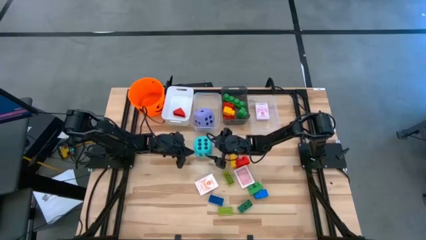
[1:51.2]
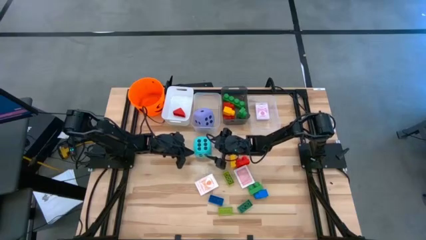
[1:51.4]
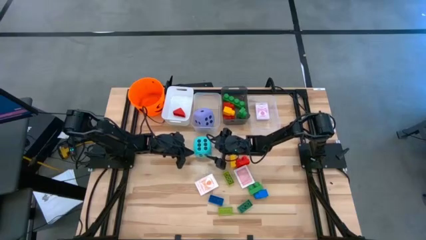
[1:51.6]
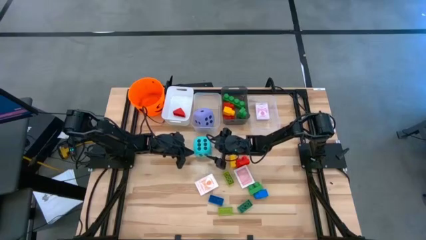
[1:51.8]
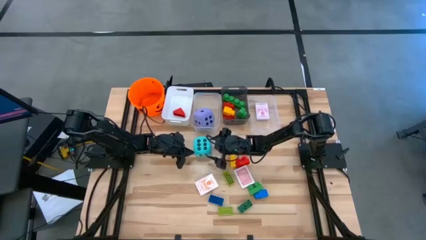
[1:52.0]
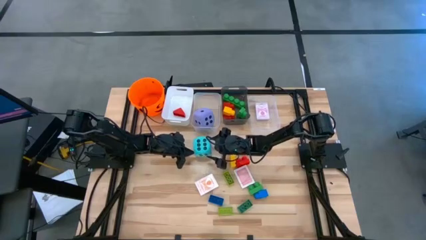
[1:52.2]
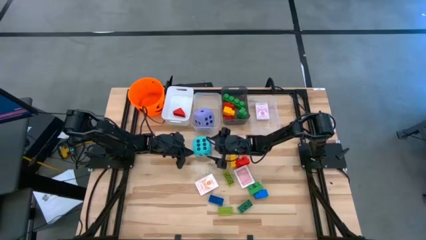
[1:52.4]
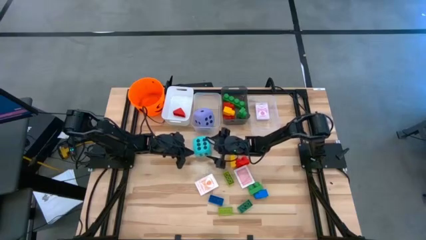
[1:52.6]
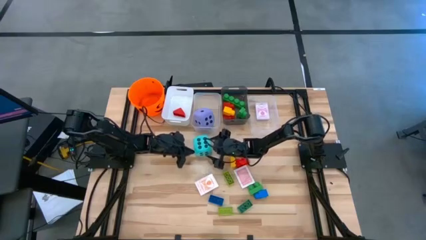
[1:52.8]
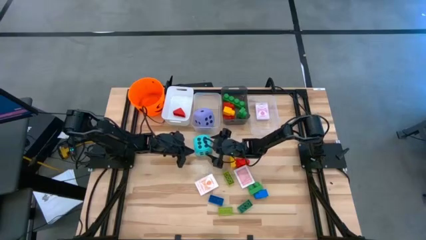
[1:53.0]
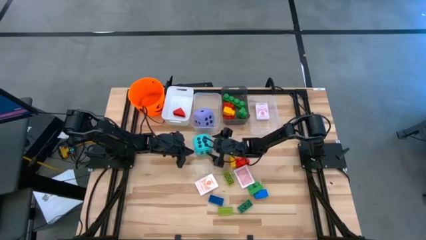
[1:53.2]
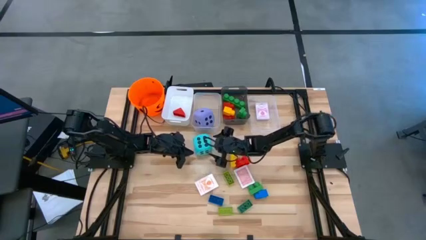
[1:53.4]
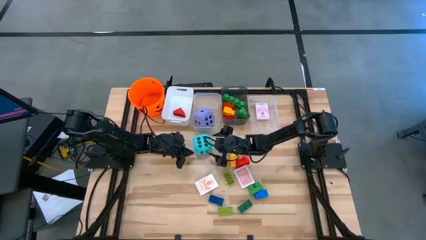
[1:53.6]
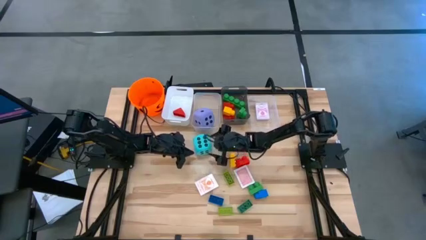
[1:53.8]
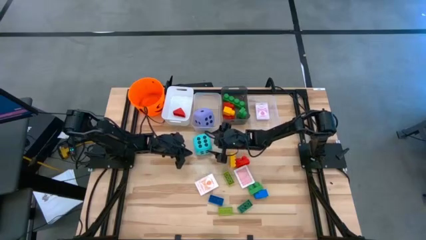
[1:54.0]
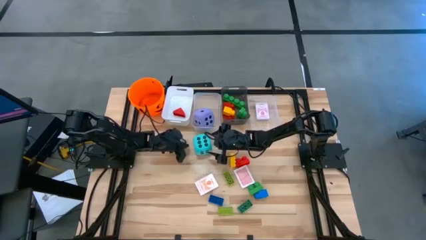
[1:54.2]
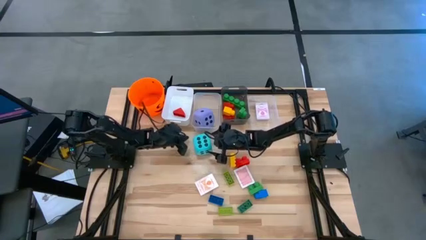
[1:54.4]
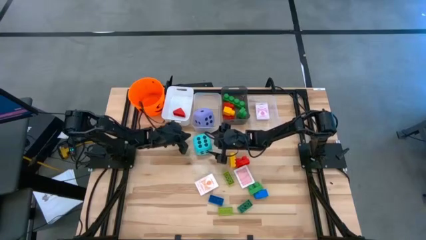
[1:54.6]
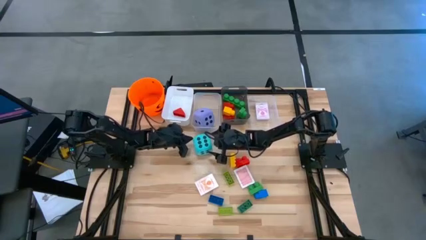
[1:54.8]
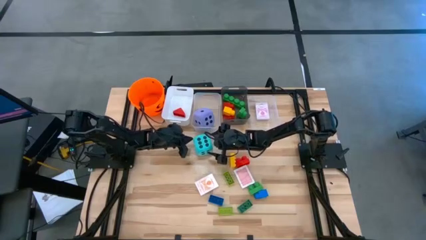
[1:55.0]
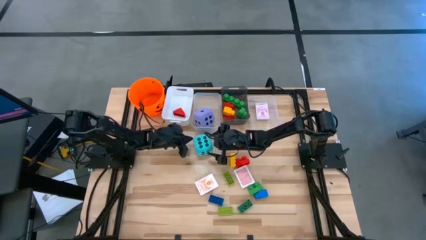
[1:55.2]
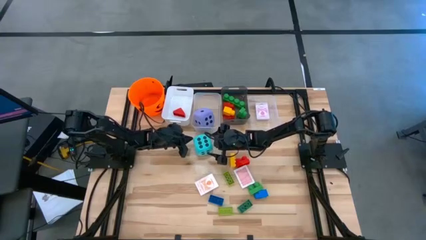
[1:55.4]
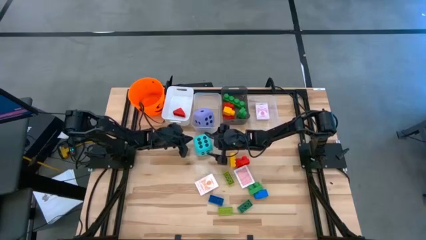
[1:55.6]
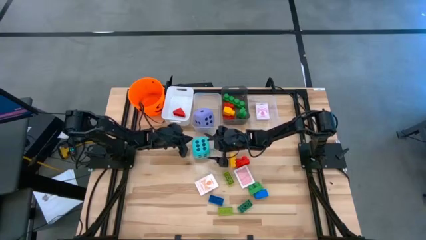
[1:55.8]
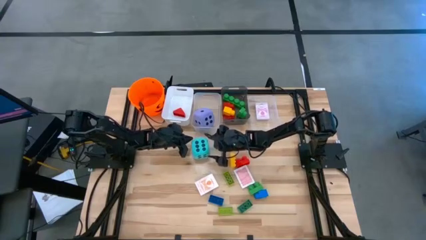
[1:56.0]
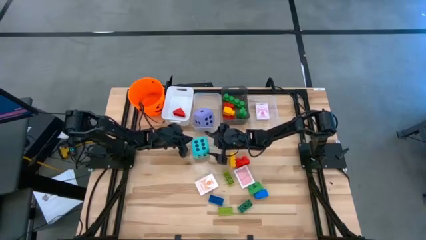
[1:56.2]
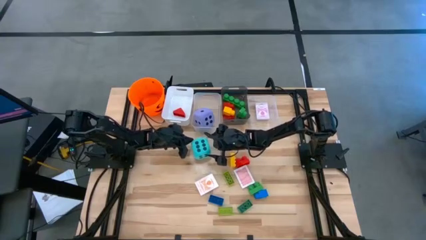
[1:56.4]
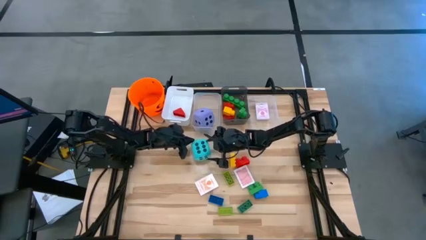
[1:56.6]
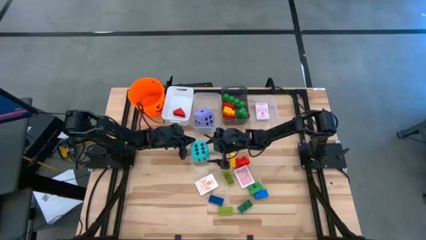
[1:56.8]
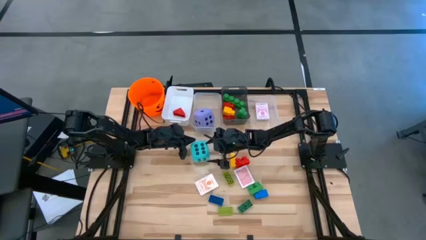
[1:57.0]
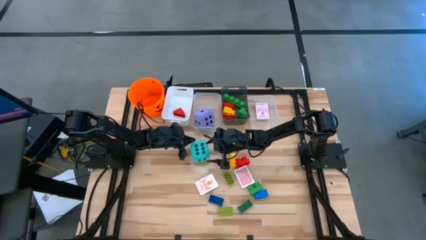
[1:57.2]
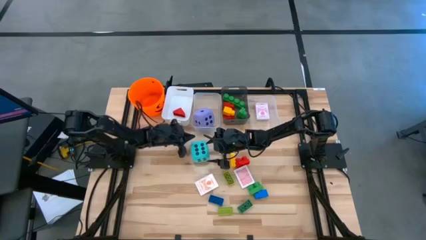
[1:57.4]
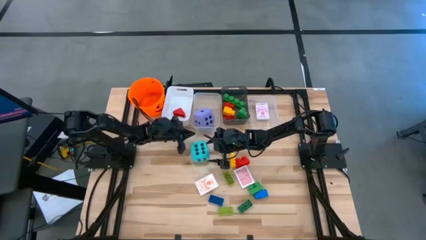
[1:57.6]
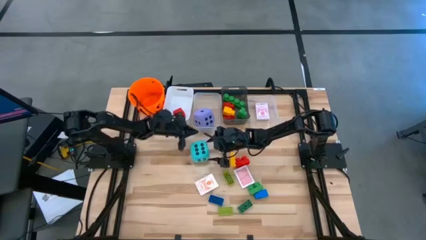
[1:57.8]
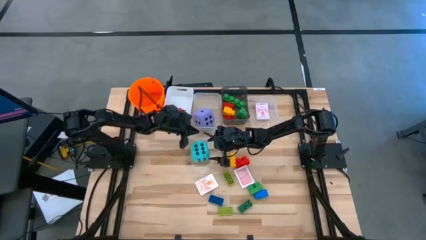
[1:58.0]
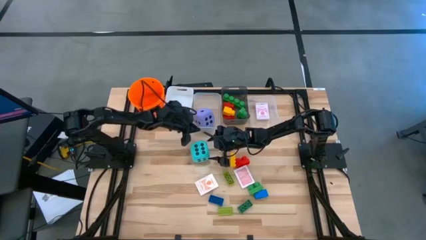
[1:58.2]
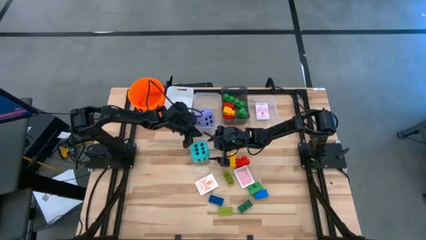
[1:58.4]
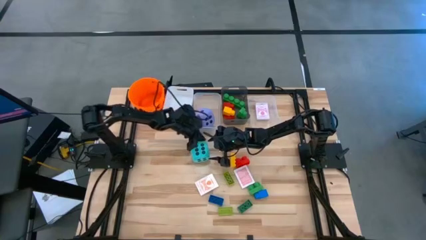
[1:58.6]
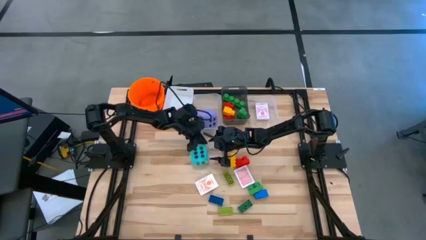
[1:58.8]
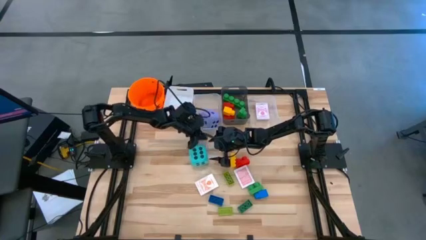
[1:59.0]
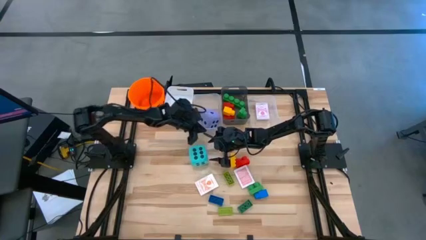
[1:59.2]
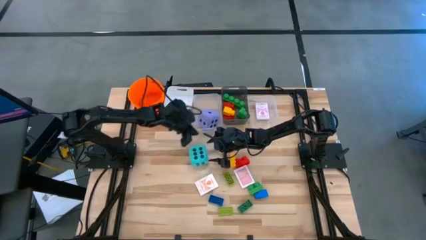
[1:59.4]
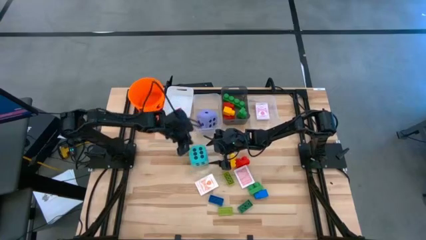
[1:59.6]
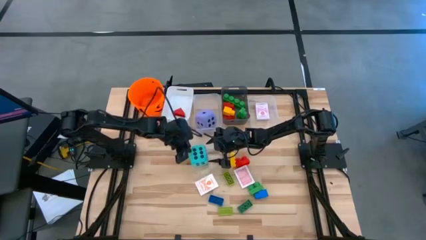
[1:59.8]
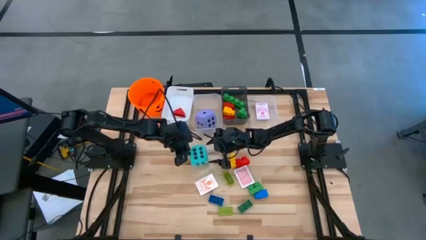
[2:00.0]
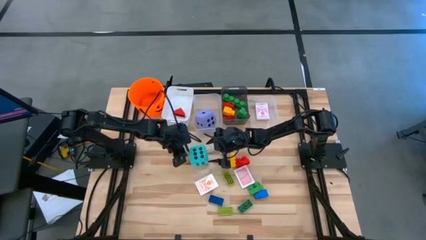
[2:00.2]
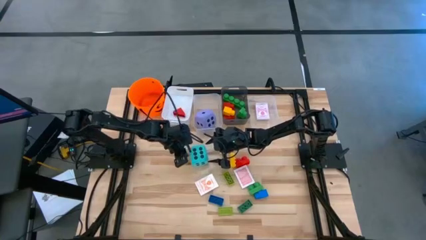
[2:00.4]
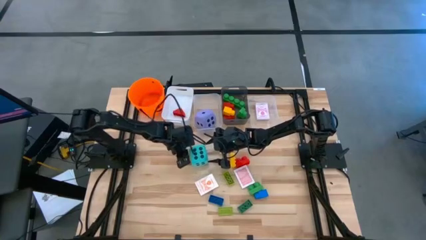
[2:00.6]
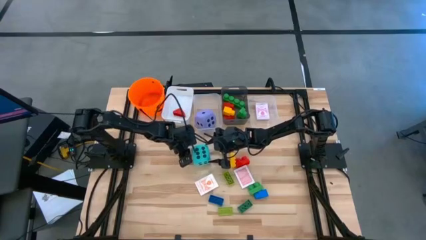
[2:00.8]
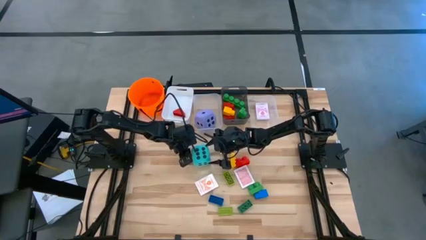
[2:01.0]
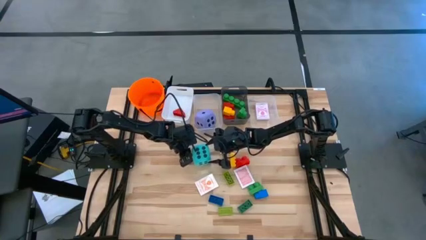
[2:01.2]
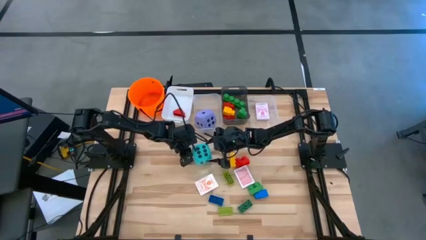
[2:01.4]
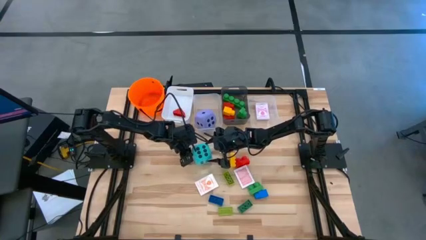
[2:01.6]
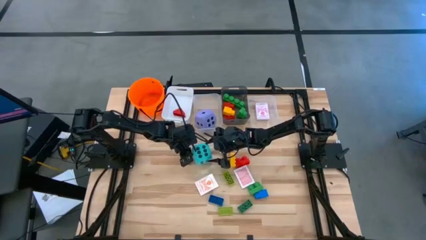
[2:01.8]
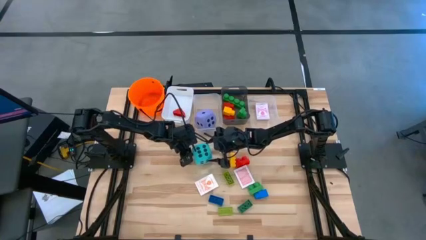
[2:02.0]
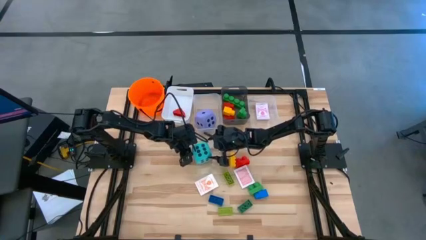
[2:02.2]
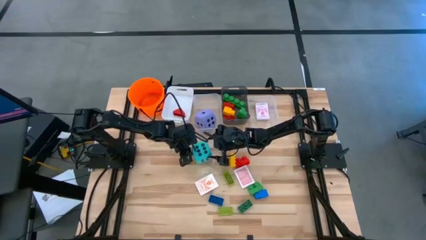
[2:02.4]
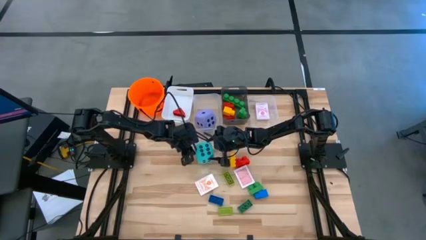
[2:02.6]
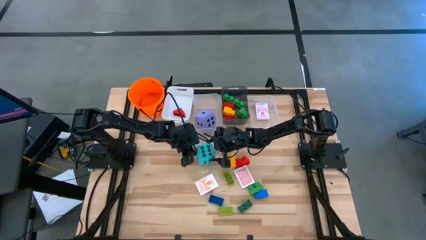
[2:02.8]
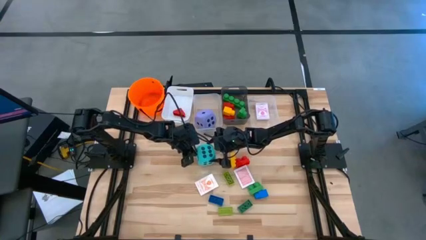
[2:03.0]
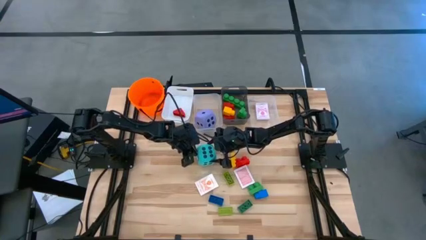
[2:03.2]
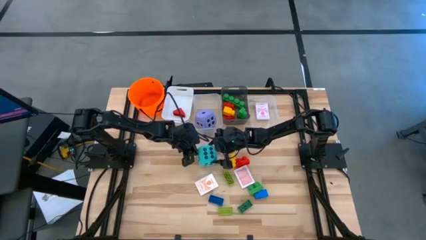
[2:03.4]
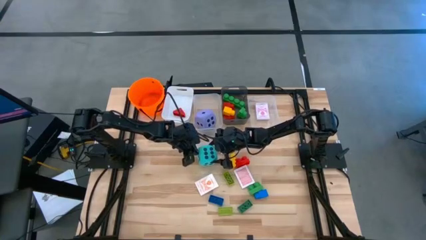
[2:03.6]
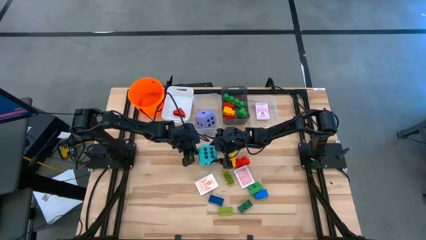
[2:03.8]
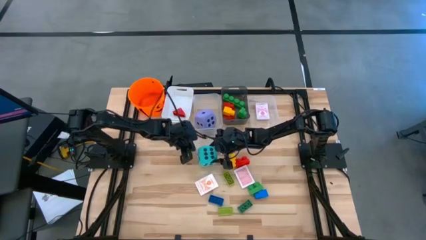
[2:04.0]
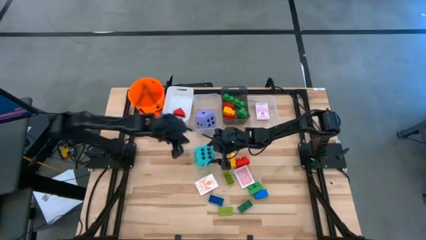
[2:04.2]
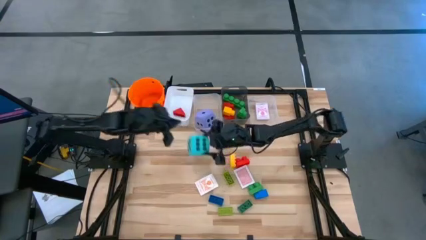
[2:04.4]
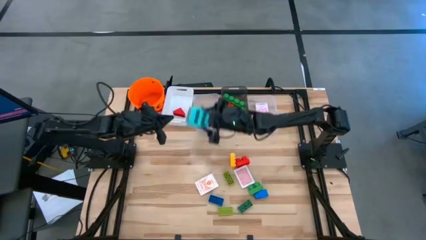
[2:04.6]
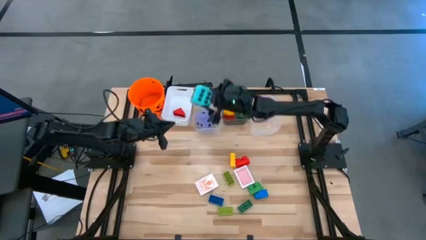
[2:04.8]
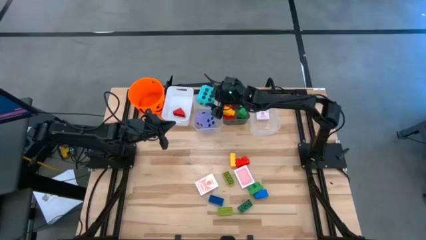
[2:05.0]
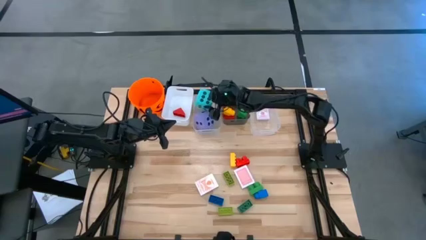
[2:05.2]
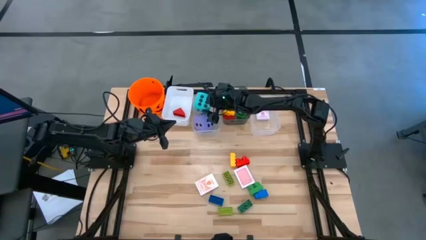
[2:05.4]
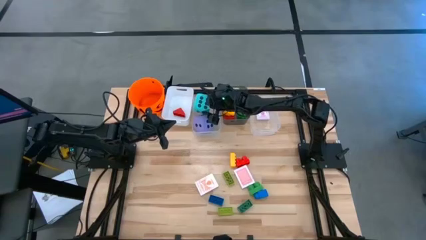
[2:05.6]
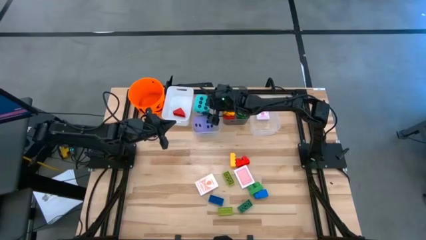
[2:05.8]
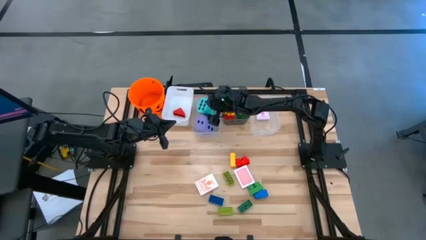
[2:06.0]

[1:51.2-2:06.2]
Task: Pick & Place Toys
Put the large blue dice into the left transparent bin

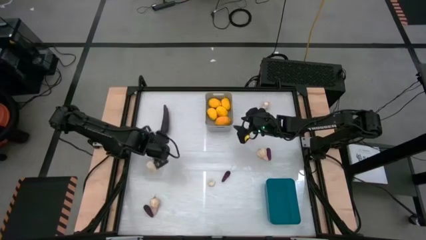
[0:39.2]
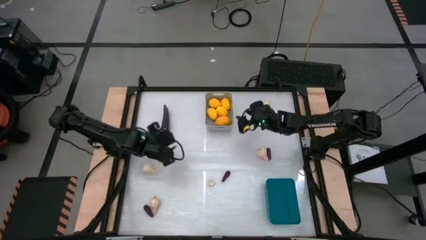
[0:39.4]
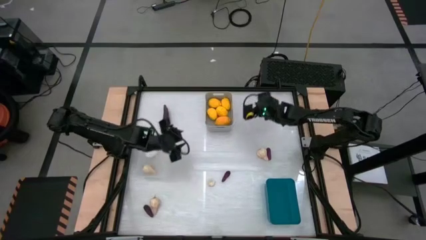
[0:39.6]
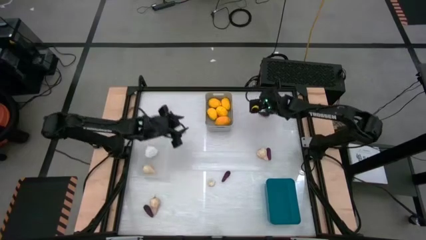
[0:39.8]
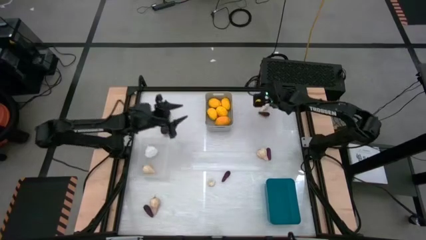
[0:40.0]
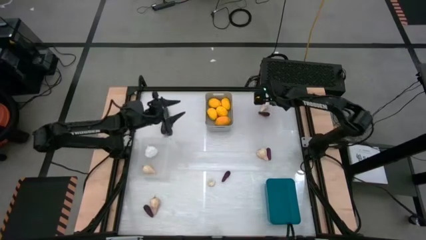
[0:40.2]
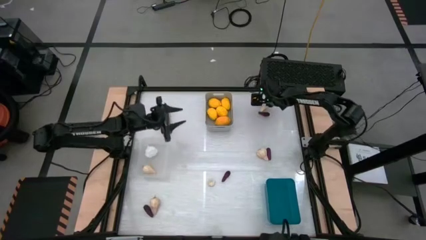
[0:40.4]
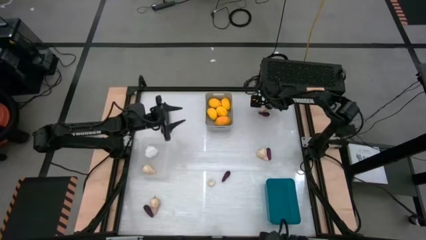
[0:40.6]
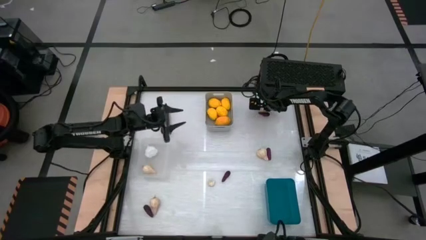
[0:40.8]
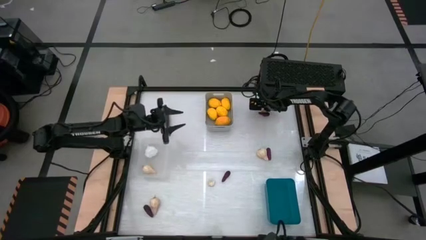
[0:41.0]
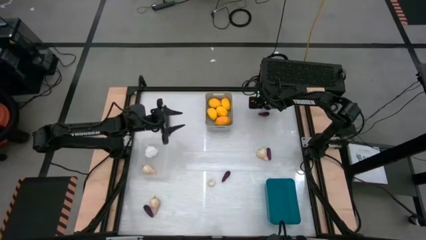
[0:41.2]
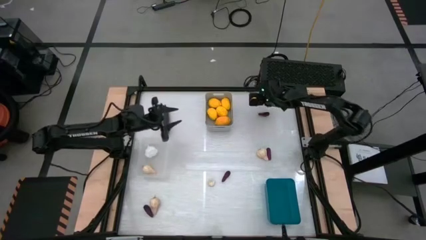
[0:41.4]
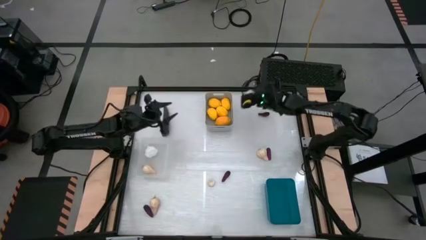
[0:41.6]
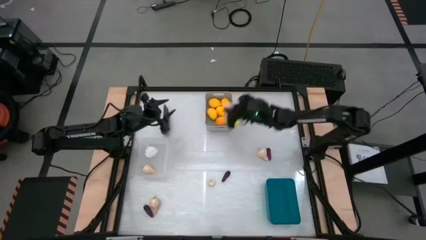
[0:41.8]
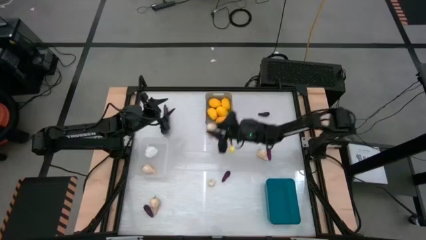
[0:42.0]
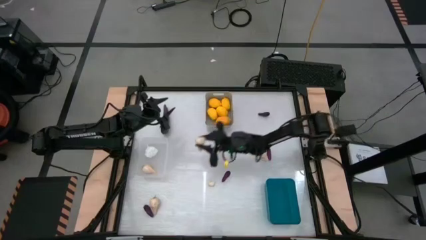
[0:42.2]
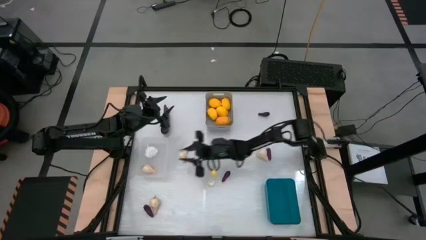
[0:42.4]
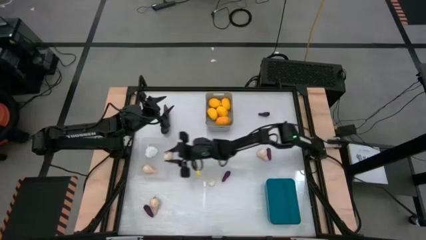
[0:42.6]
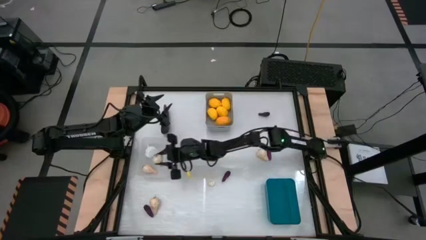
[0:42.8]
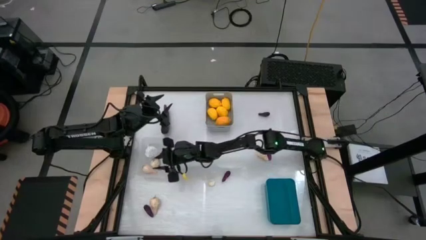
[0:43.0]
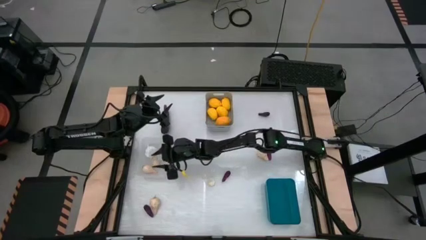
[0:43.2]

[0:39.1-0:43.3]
Task: Sort produce into baskets
Put the garlic into the transparent bin
